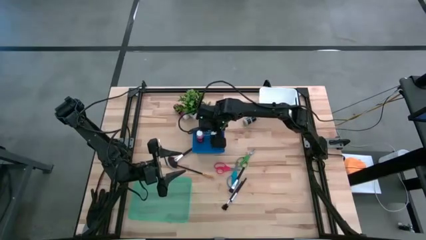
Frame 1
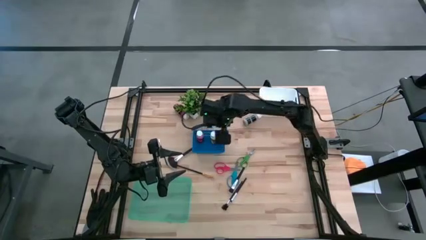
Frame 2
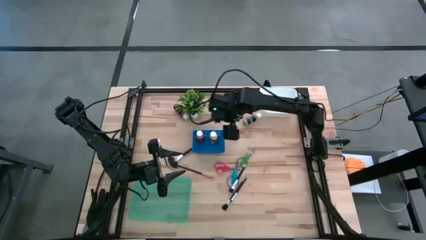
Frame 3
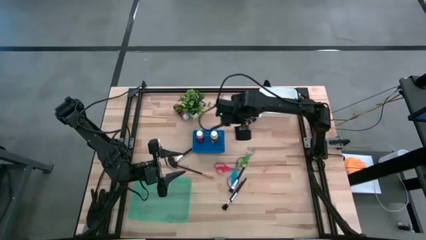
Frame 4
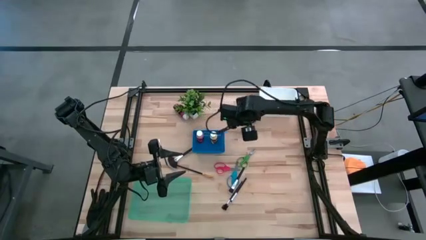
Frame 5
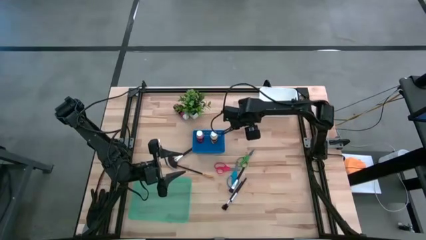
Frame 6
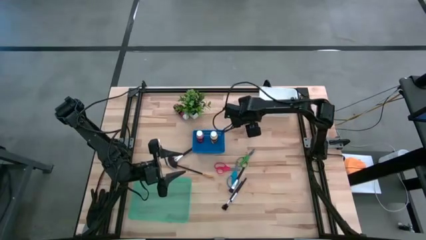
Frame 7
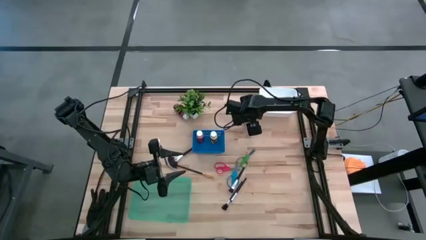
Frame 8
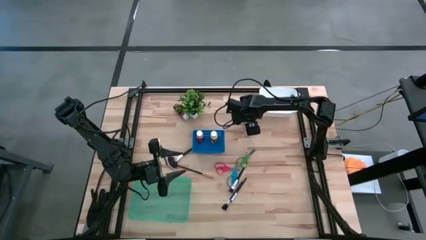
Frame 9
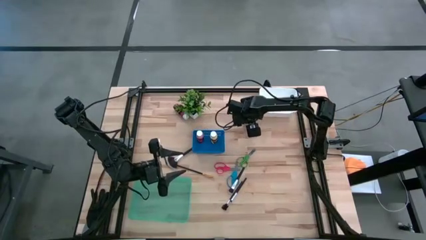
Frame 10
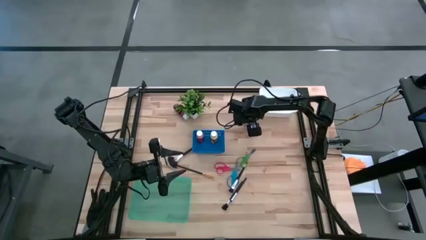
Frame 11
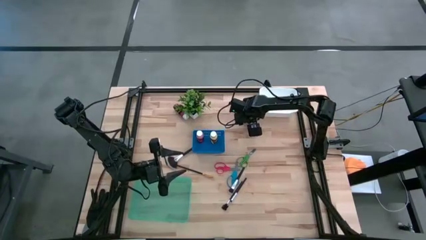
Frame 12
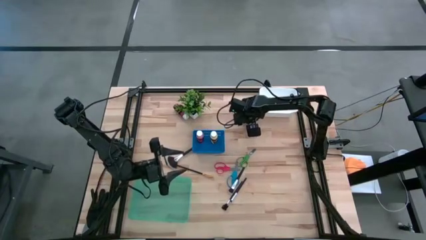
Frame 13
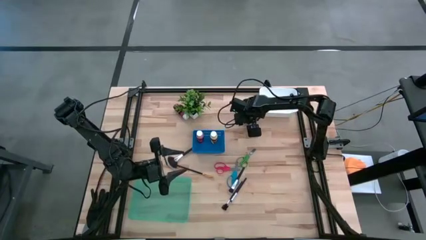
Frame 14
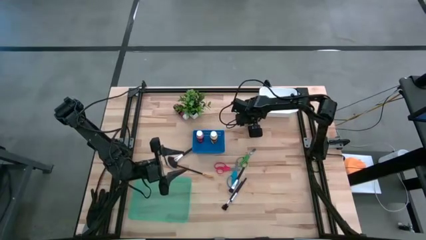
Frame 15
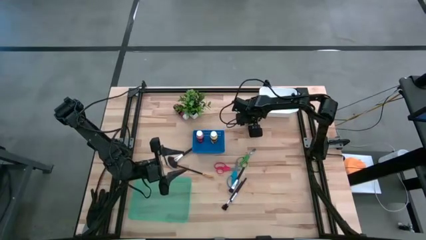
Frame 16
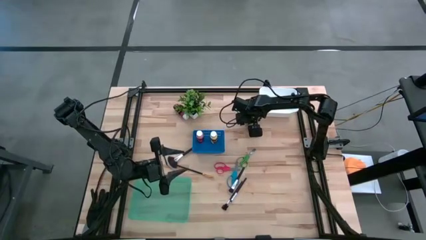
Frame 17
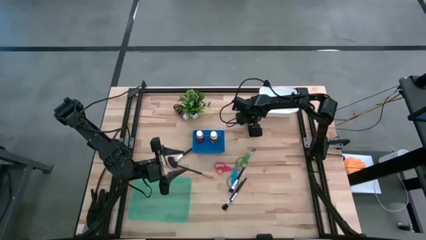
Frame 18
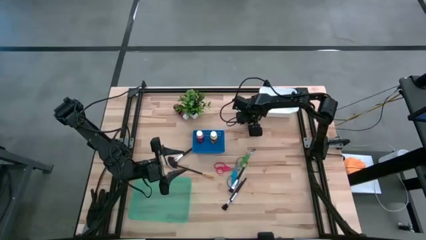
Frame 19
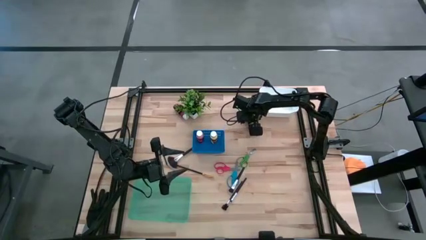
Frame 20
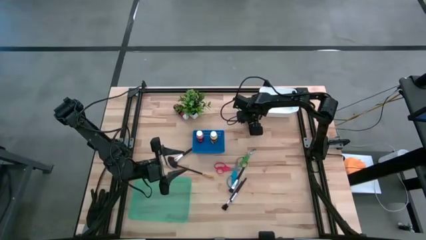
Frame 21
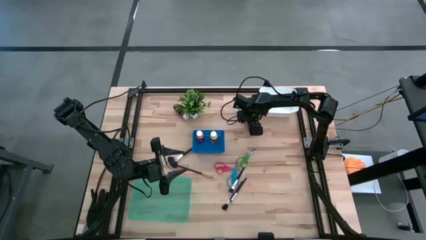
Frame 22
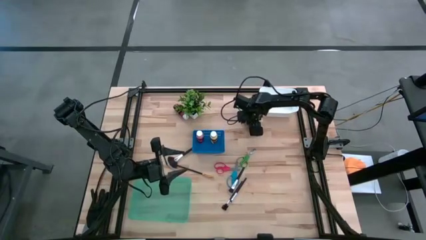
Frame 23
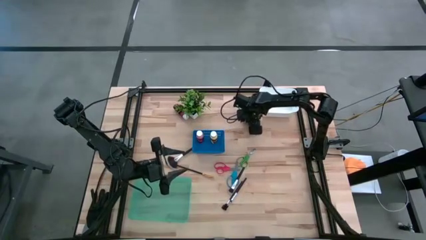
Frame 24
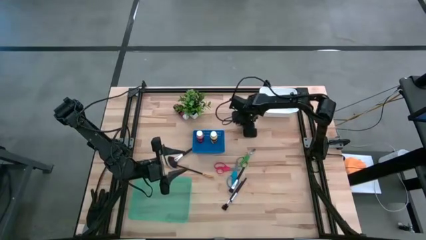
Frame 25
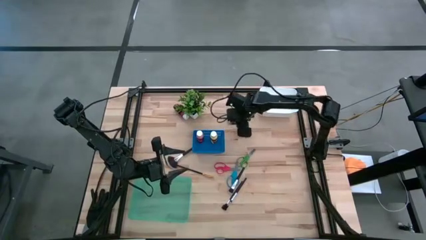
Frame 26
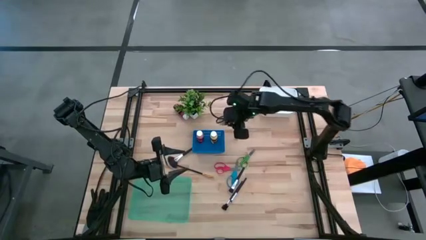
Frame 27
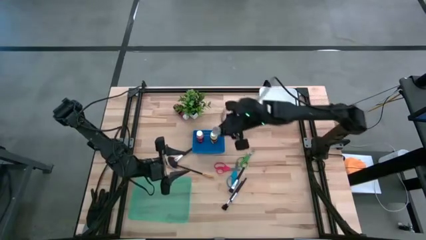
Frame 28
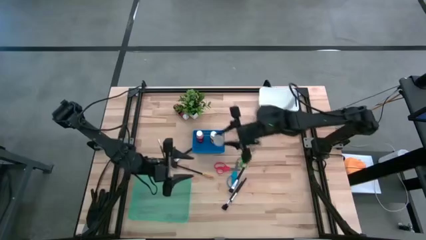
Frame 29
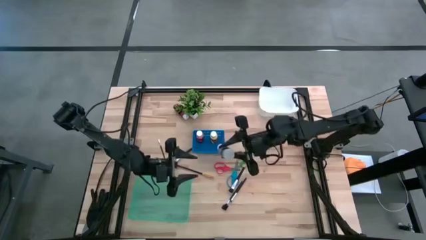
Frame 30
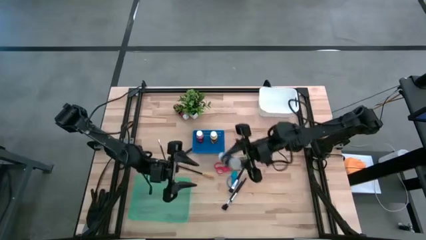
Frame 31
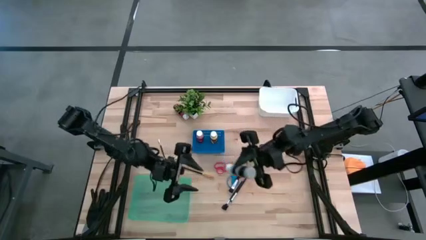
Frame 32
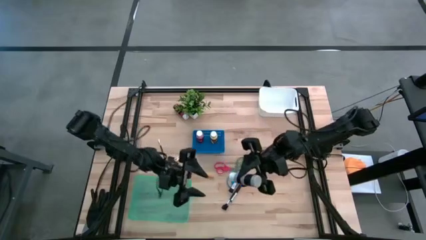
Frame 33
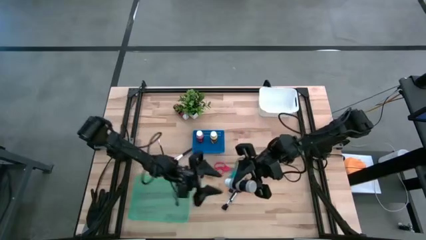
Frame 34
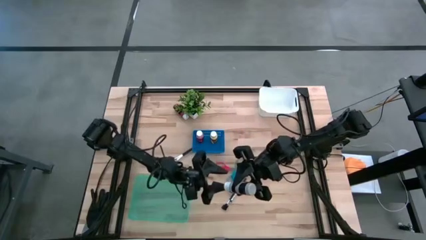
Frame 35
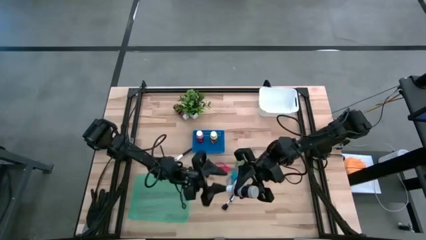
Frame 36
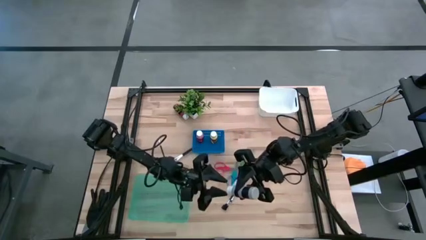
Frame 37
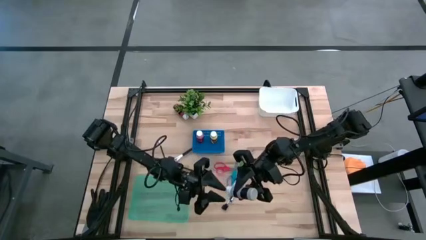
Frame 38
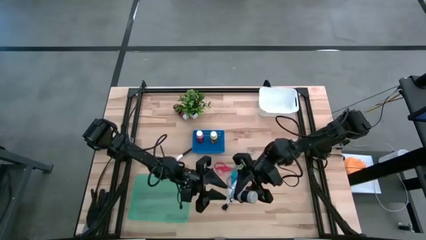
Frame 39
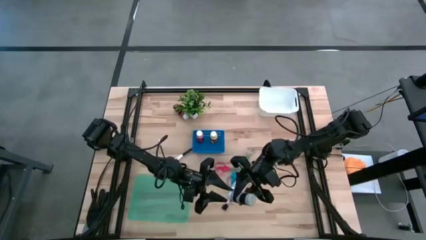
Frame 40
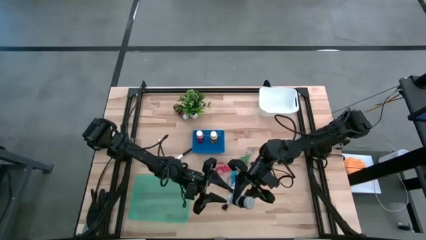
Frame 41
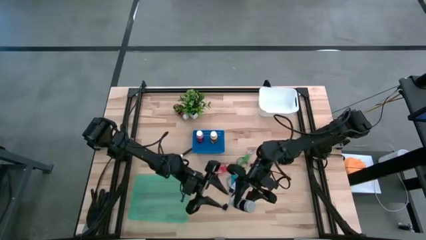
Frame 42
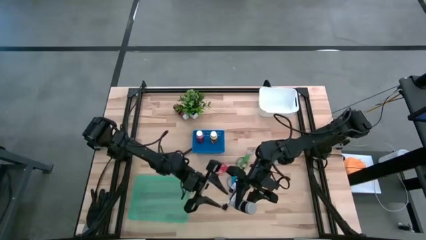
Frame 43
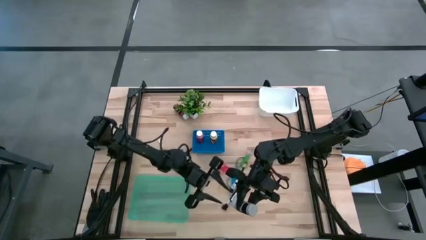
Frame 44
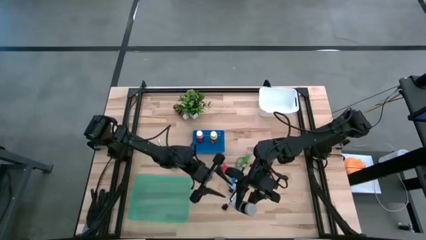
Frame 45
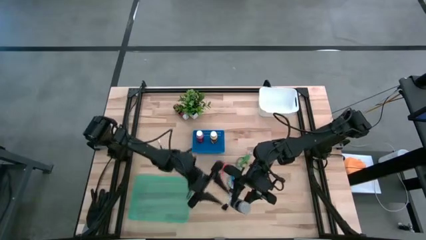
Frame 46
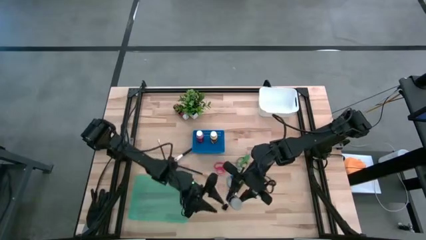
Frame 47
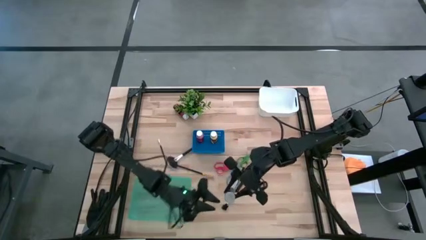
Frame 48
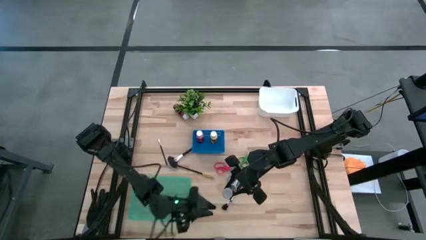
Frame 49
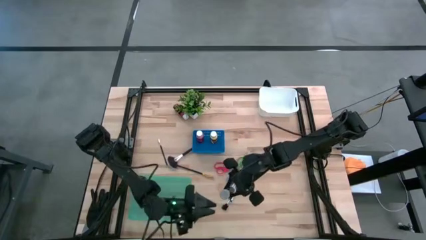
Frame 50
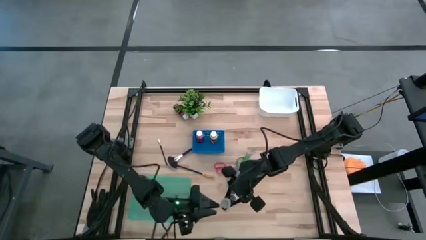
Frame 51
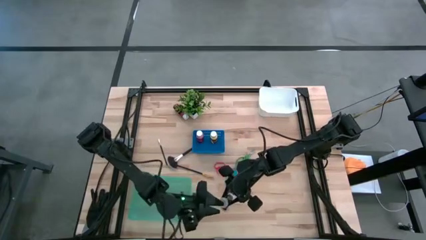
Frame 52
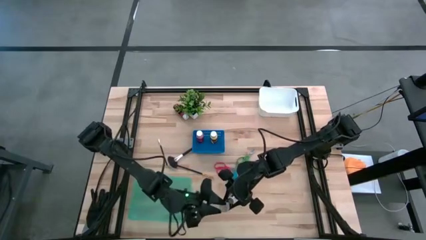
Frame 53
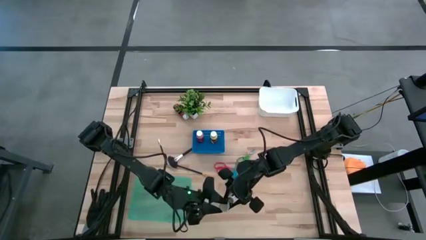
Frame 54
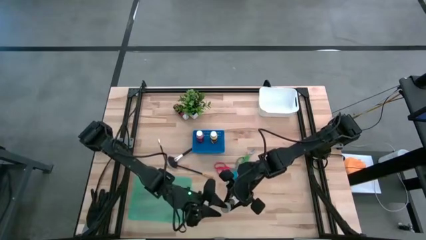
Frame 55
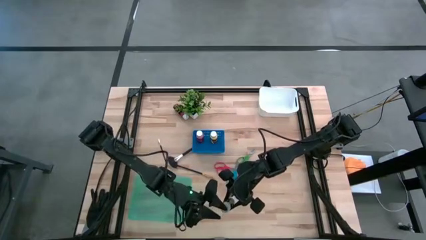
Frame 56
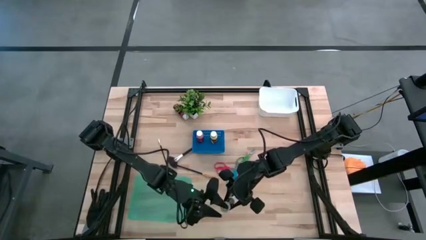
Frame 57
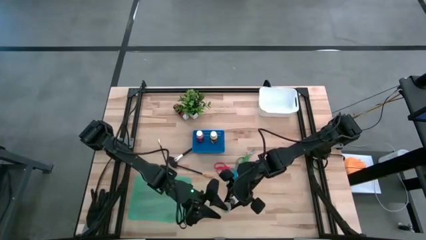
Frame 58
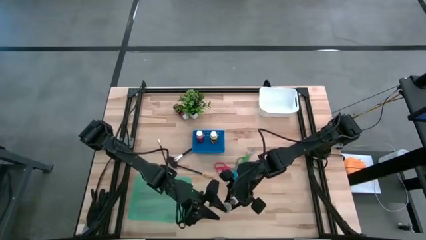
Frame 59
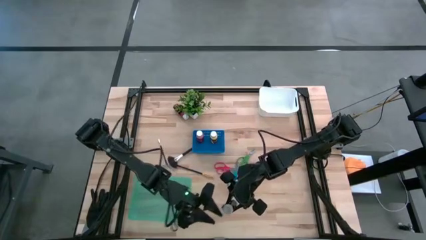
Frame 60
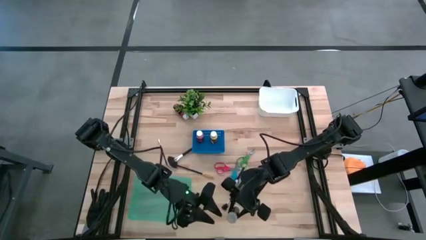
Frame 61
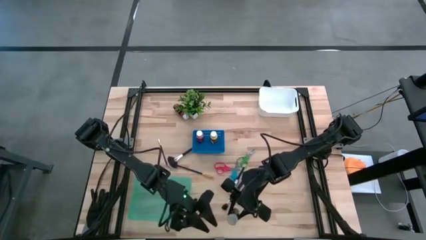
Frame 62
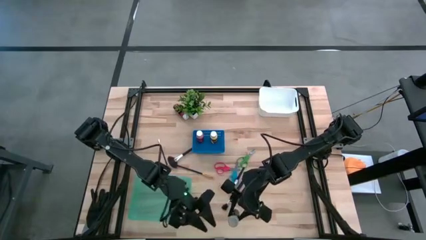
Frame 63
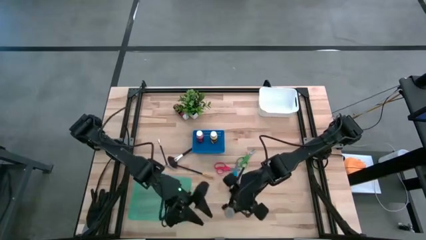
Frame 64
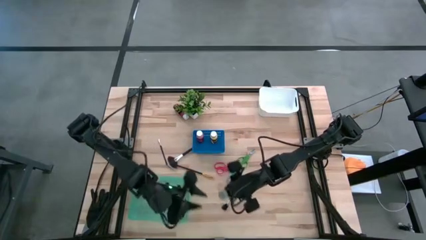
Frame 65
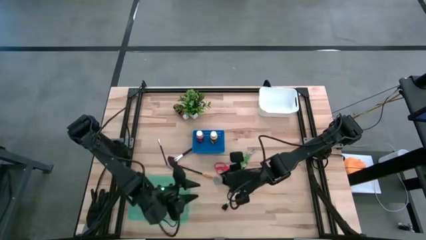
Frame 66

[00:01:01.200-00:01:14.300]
Task: Pick & Place Paint Supplies
Put the grey paint into the blue bin
